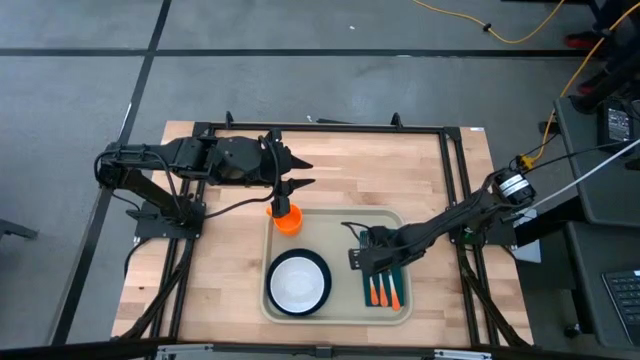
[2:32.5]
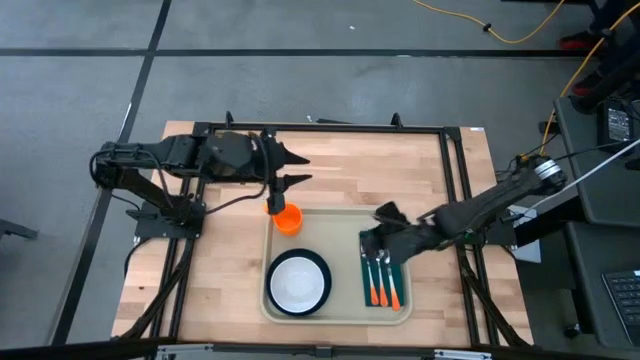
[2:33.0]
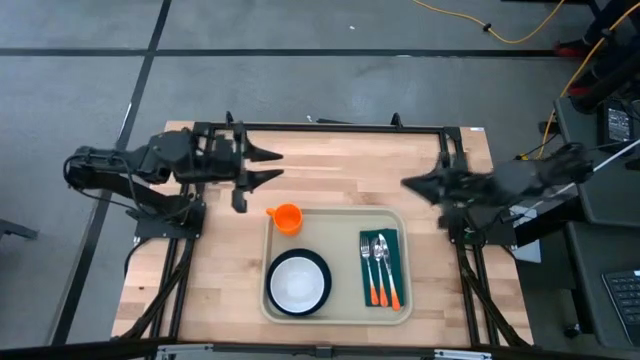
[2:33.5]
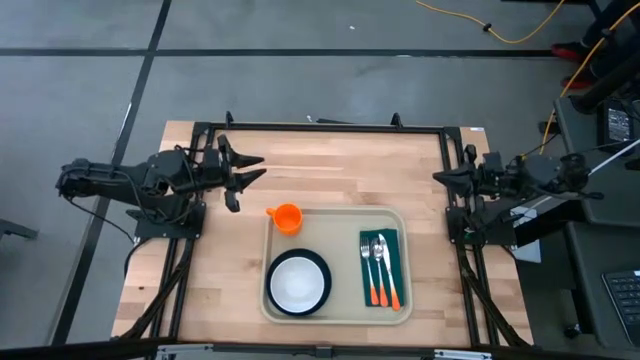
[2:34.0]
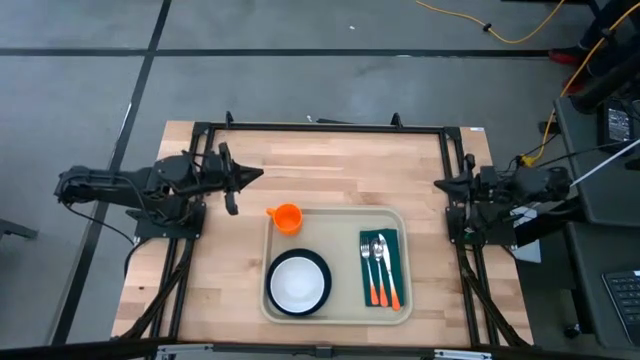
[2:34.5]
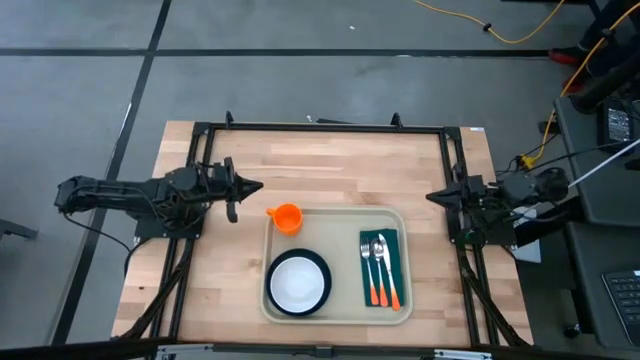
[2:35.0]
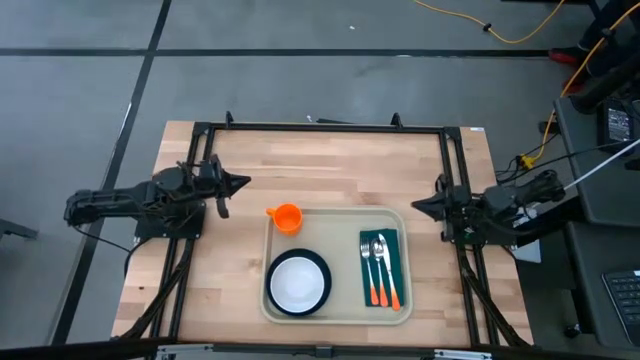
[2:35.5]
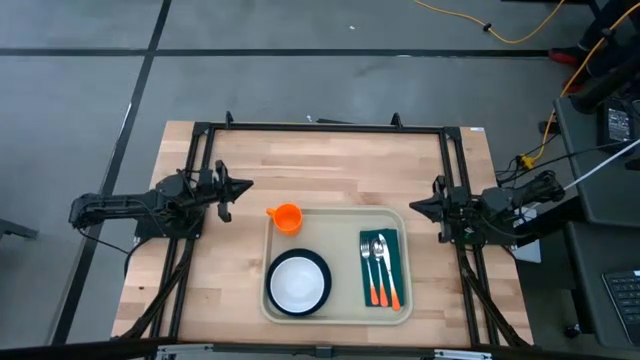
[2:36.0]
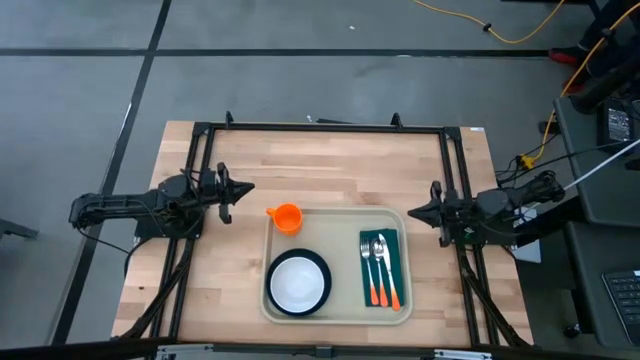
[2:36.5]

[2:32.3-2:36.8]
Task: Set up tray
Return to Home Position

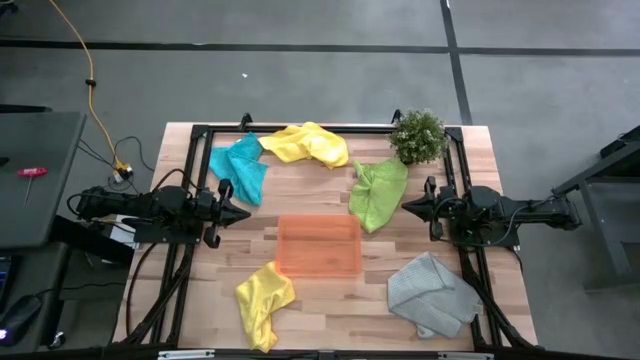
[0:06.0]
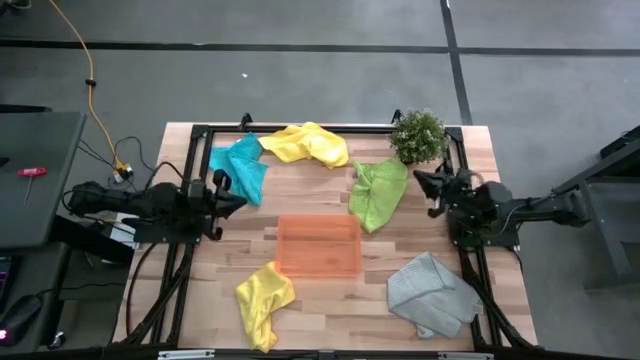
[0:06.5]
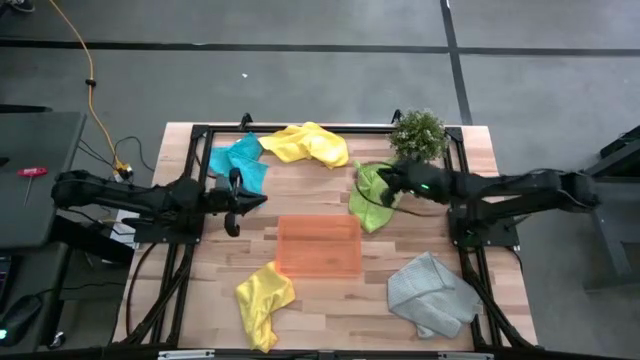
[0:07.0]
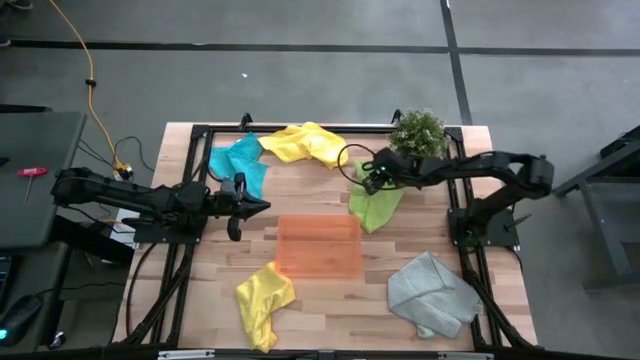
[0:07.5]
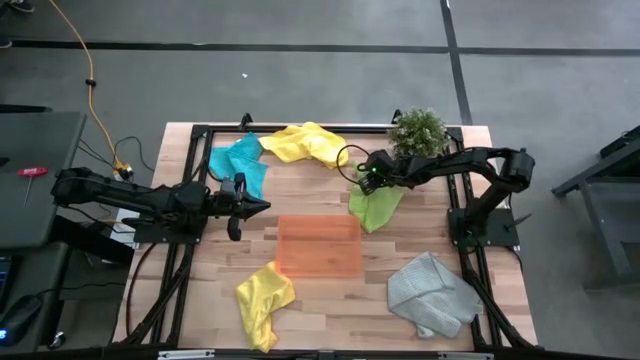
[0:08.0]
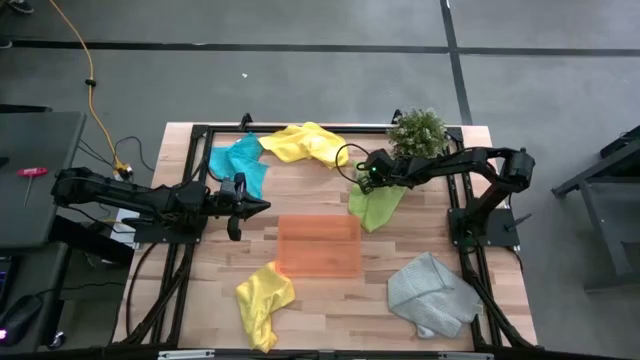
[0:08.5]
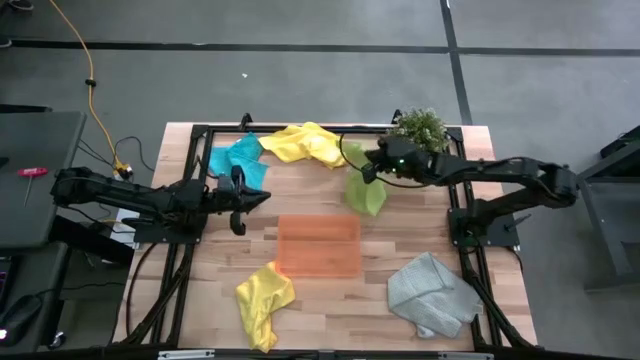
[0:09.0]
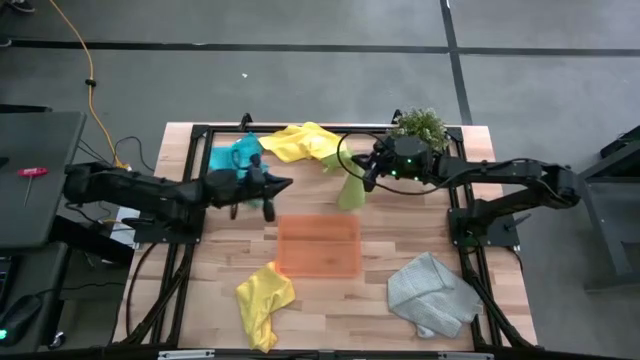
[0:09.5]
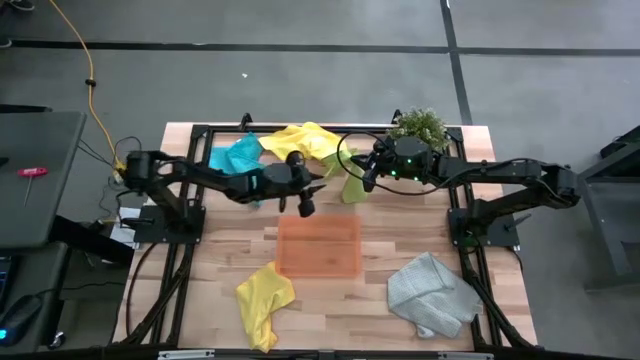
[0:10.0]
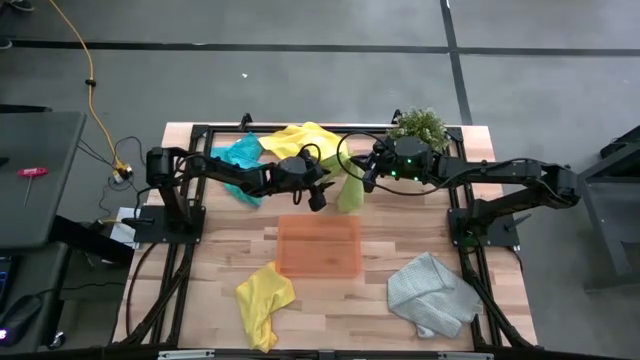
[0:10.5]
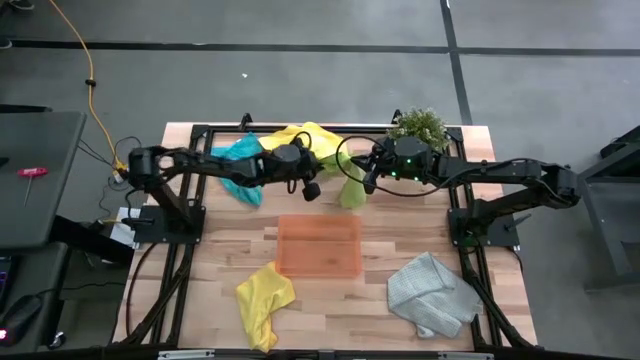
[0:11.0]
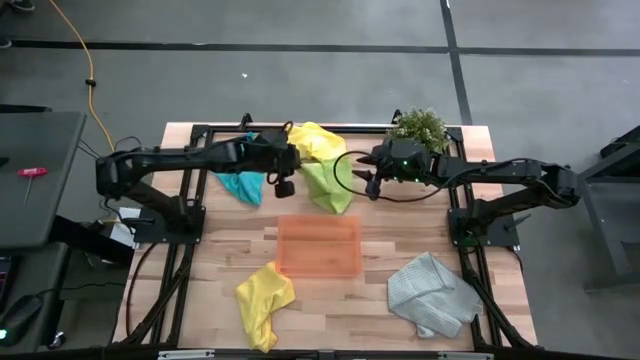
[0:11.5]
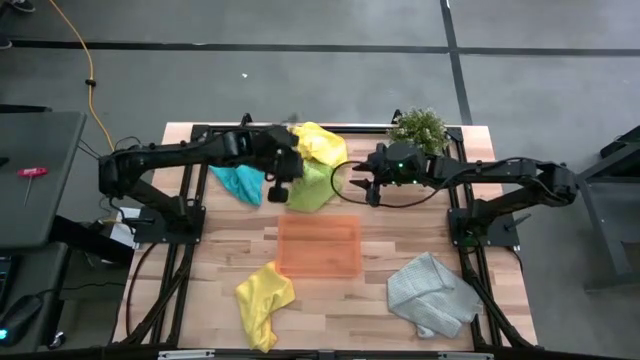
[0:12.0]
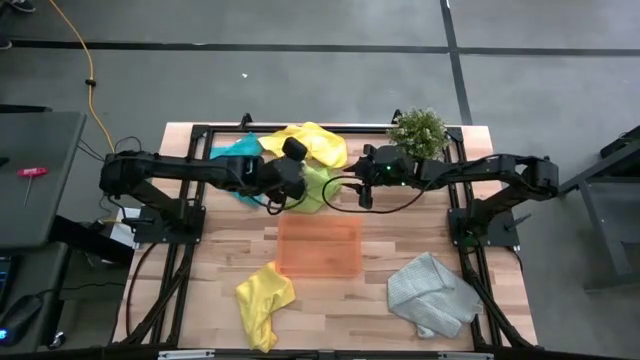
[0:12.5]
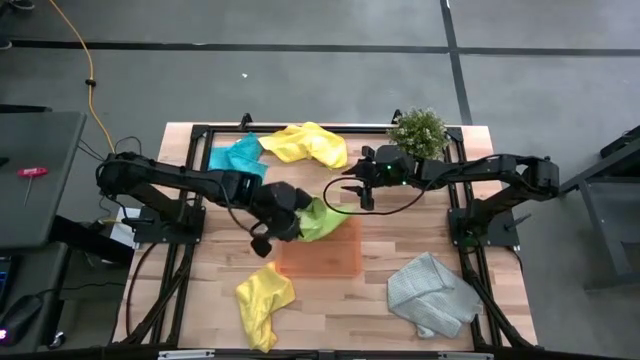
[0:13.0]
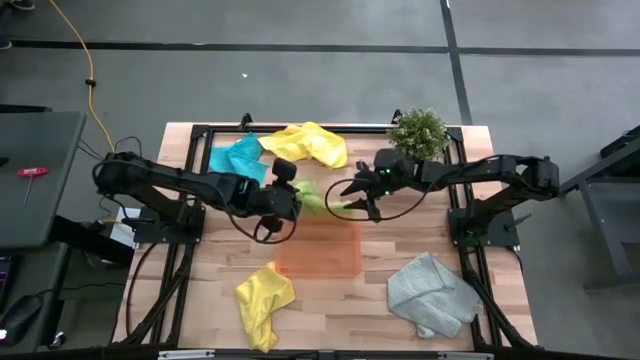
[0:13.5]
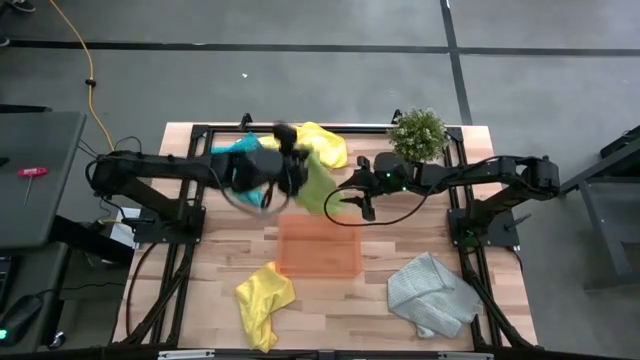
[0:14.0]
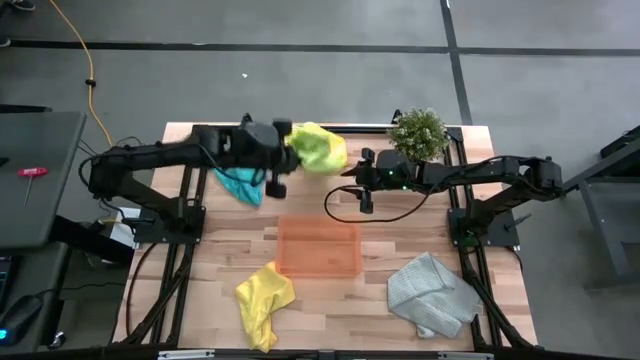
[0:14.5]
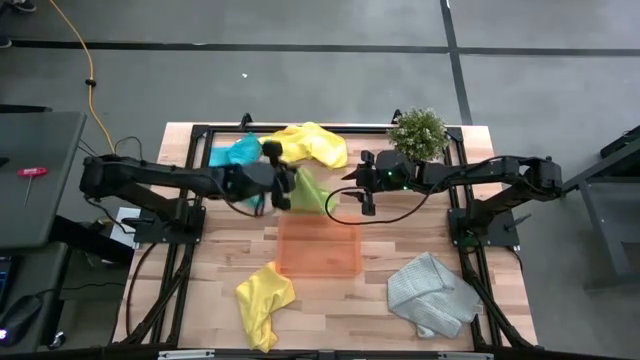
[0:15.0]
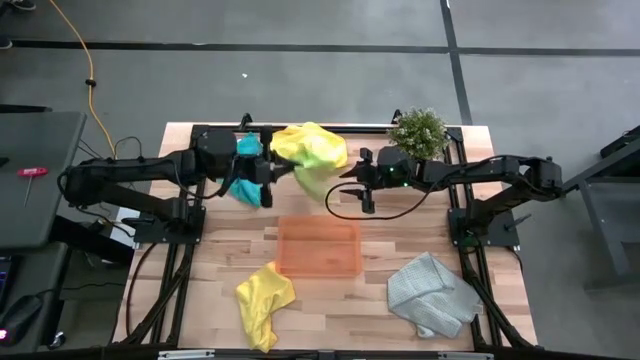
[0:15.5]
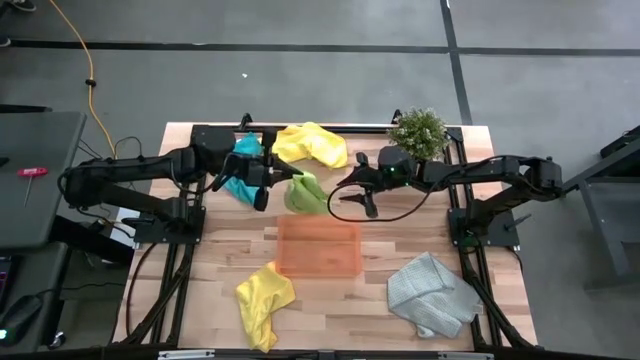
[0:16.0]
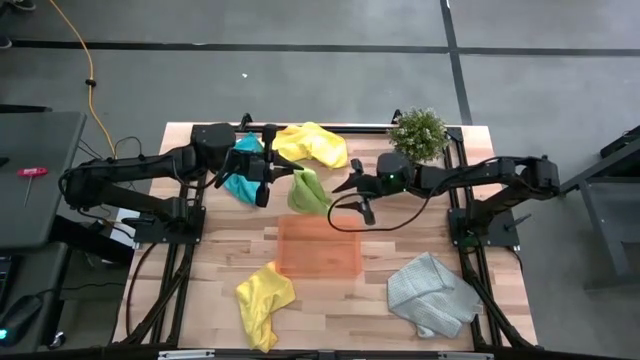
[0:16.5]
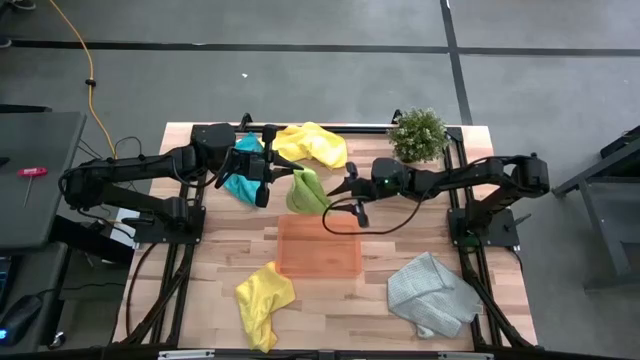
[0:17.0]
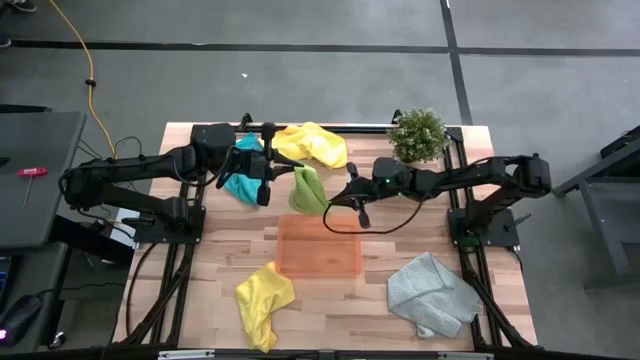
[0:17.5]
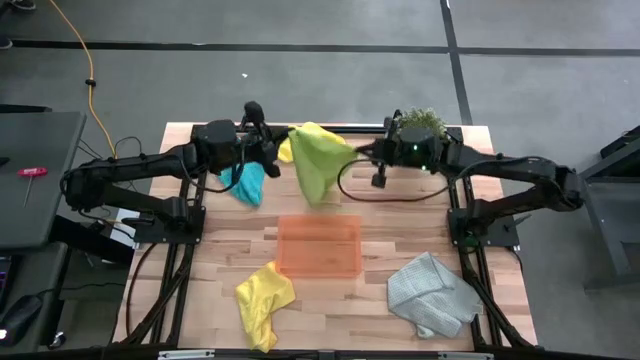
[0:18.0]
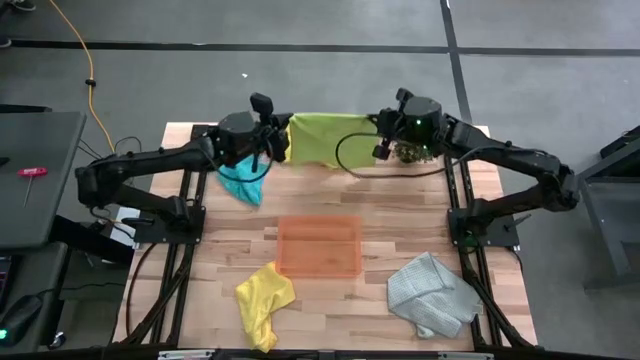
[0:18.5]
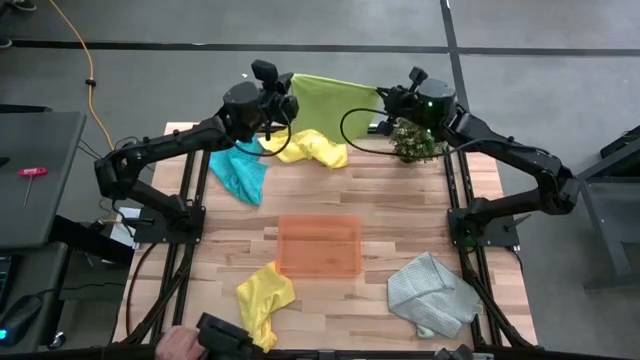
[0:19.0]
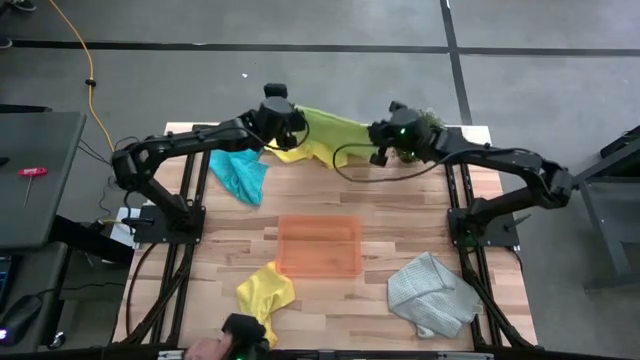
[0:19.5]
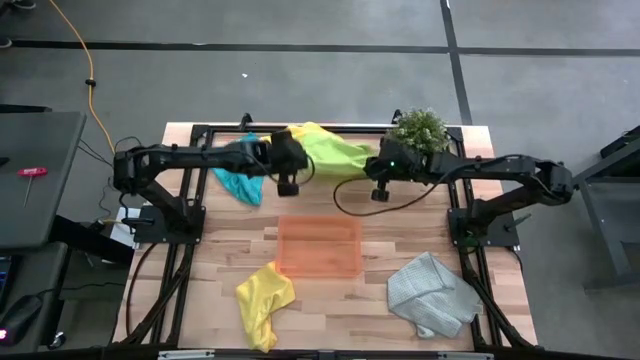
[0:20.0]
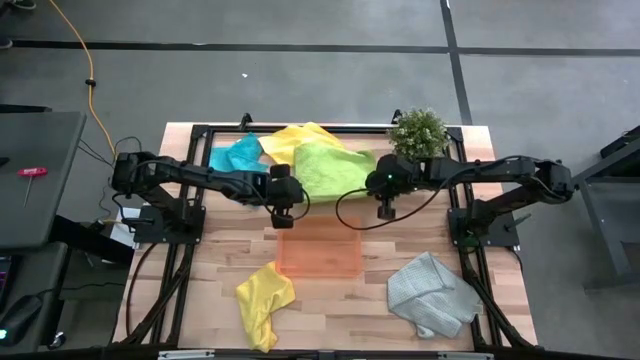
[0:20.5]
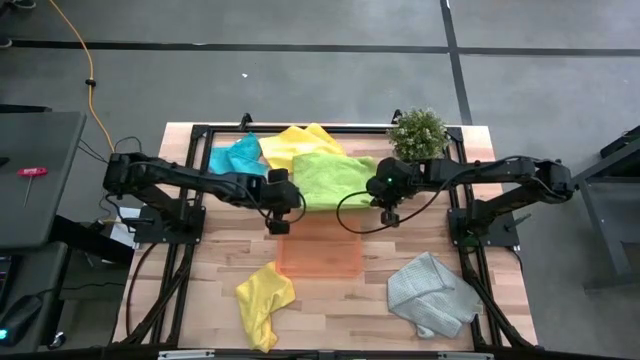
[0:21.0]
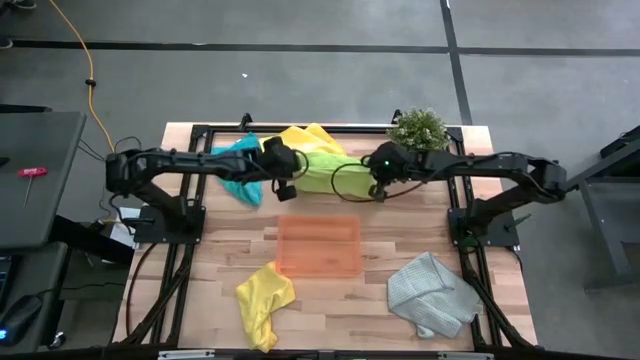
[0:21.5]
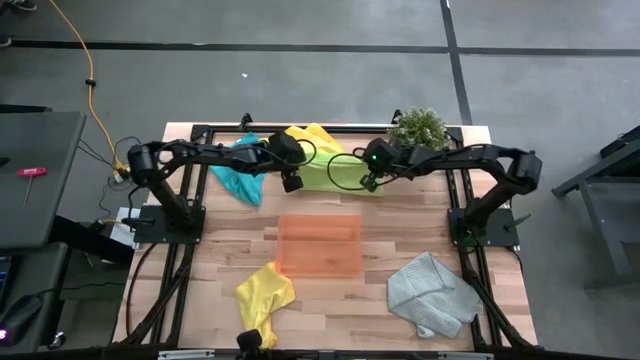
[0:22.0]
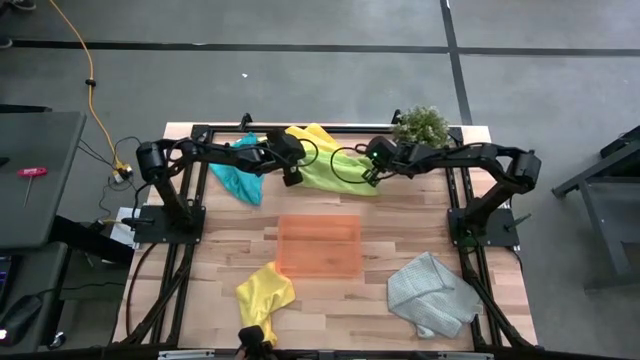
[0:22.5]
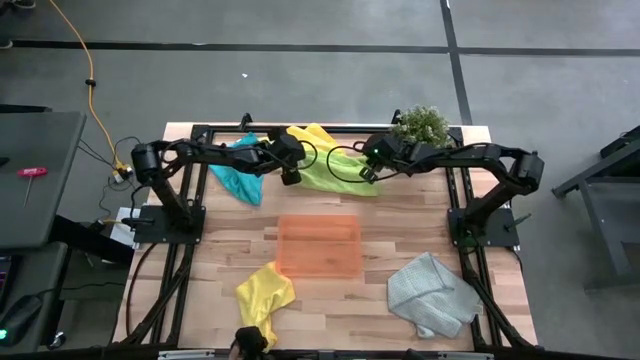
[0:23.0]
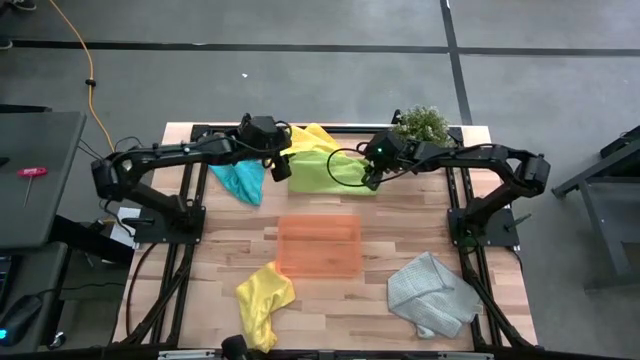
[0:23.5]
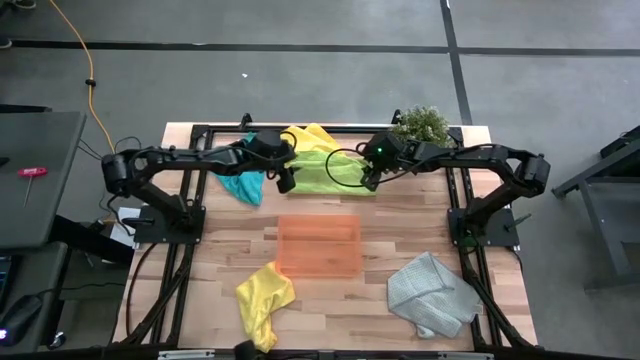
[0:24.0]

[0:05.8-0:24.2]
Task: Fold microfiber towels
Fold the green towel
